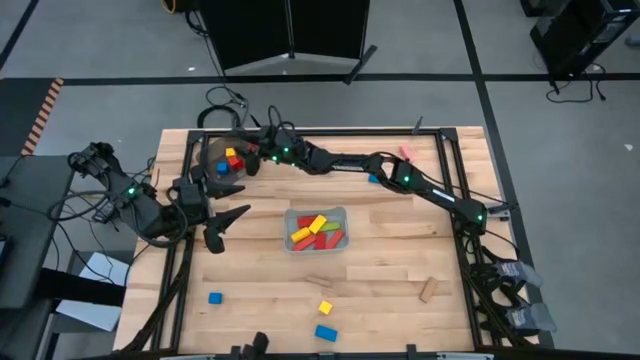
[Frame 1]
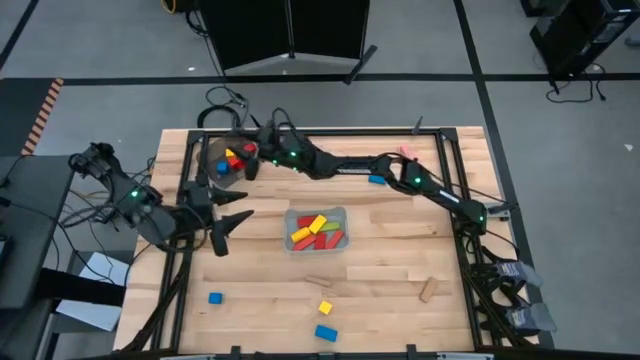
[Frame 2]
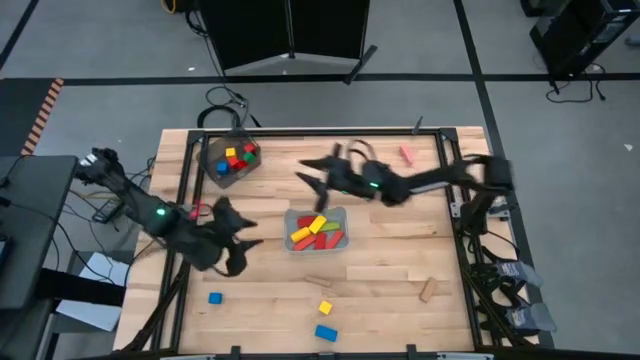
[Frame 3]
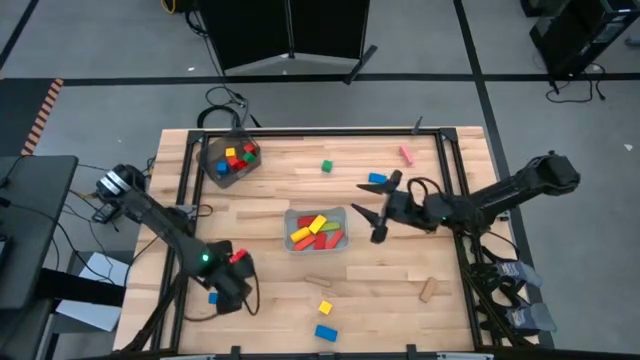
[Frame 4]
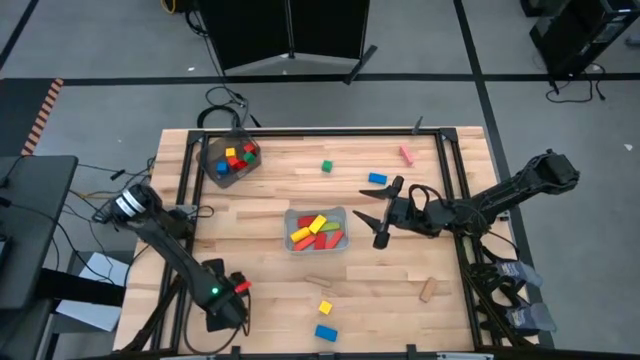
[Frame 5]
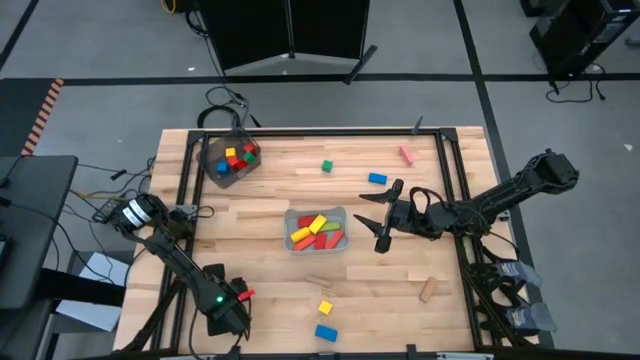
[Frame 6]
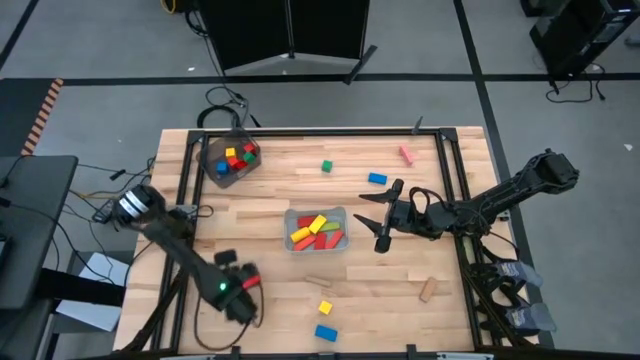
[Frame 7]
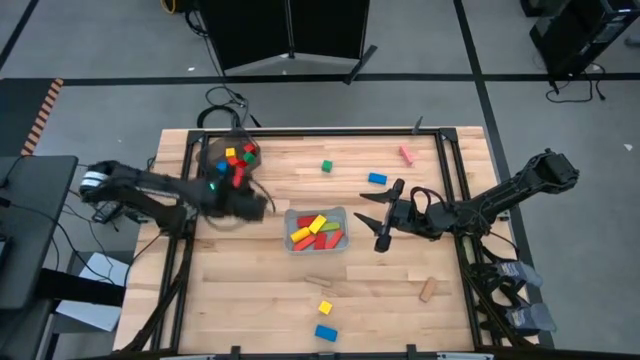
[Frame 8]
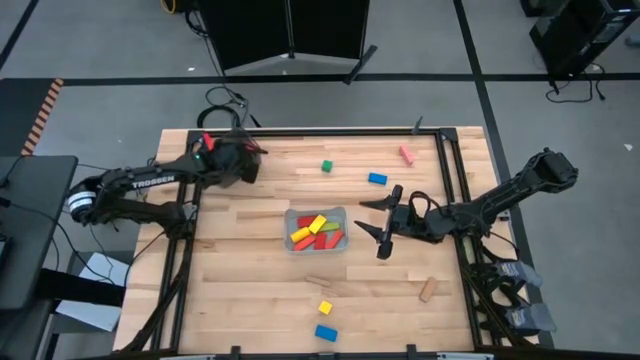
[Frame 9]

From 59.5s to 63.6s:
Task: Sort blocks by size
Put the blue cube block into the black bin

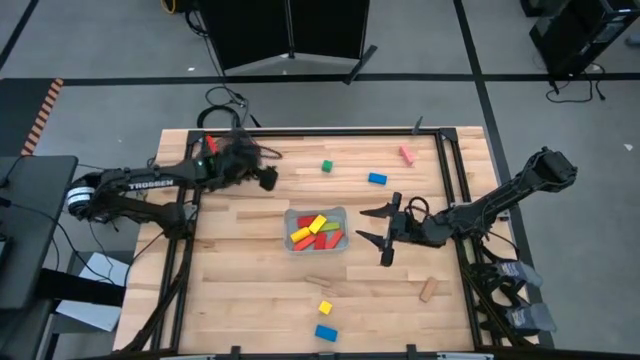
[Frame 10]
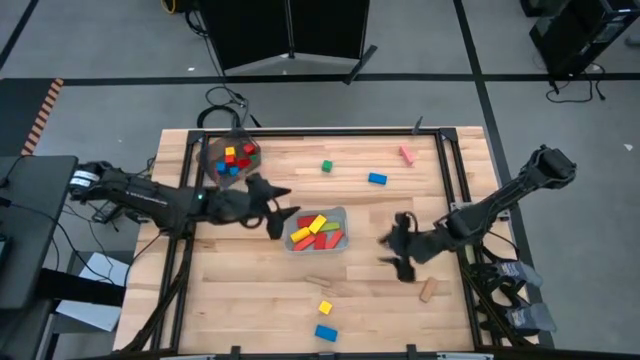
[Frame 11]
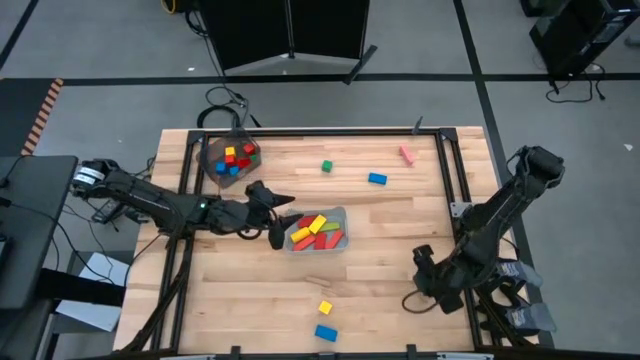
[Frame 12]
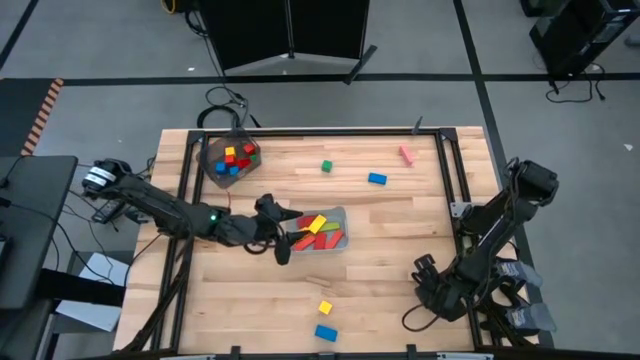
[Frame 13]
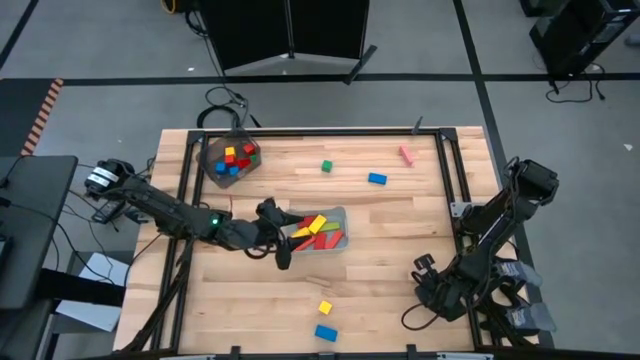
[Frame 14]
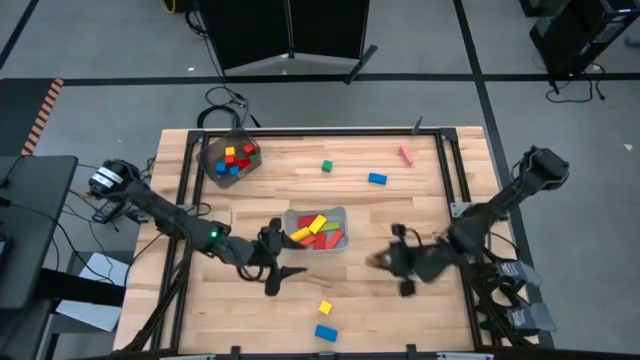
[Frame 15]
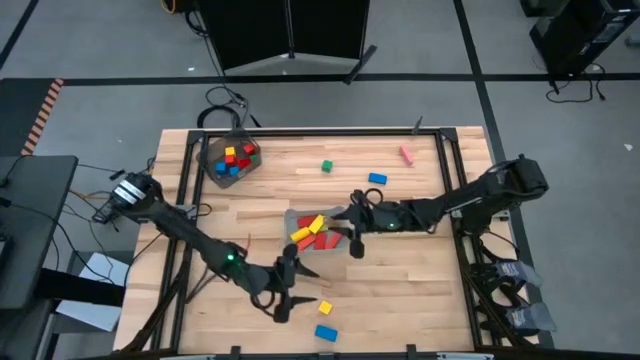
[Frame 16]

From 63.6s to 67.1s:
Put the right brown rectangular block into the gray bin

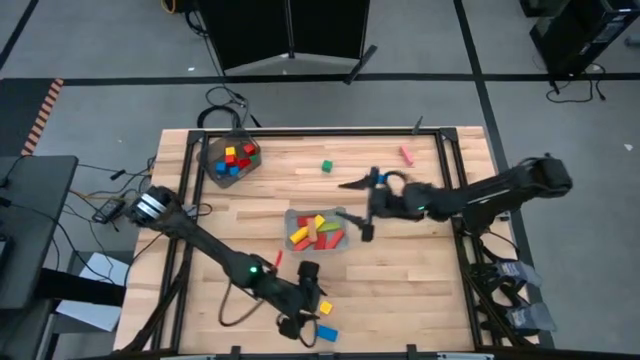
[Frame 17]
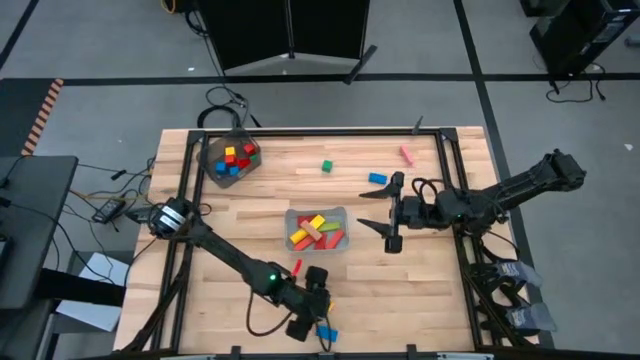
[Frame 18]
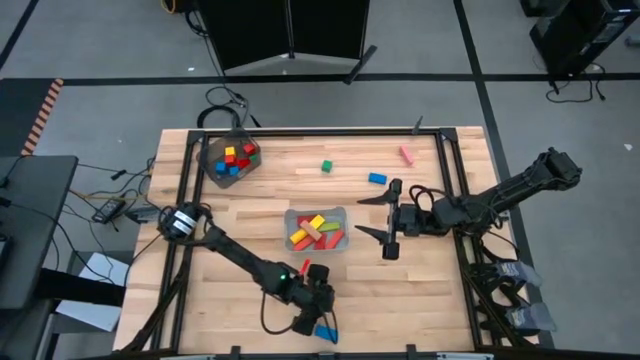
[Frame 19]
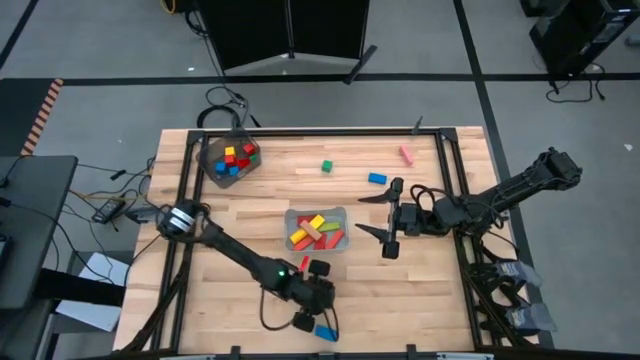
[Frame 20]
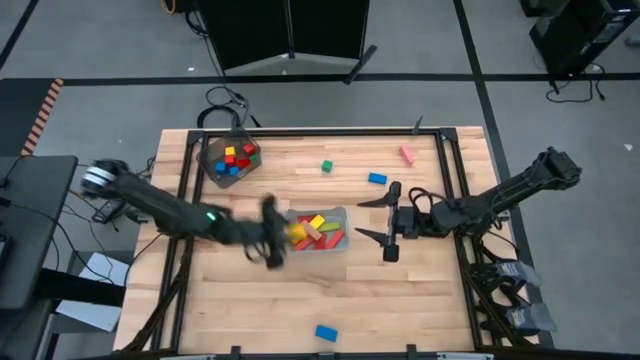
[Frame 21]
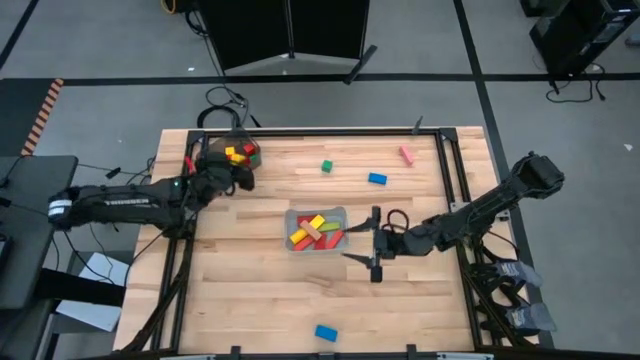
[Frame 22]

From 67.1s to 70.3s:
Put the yellow cube block into the black bin

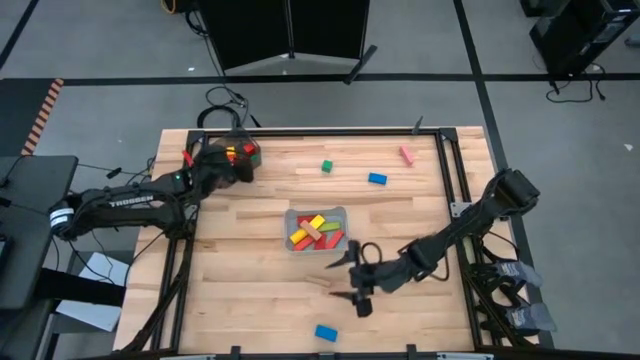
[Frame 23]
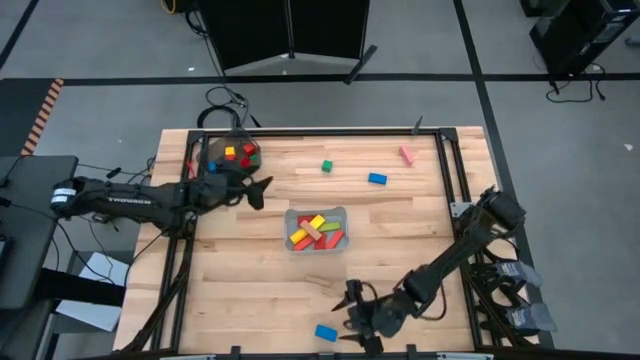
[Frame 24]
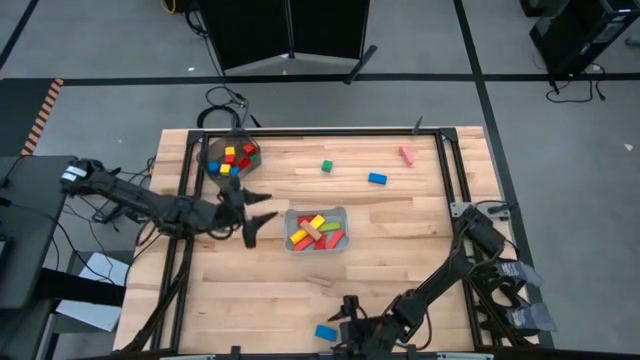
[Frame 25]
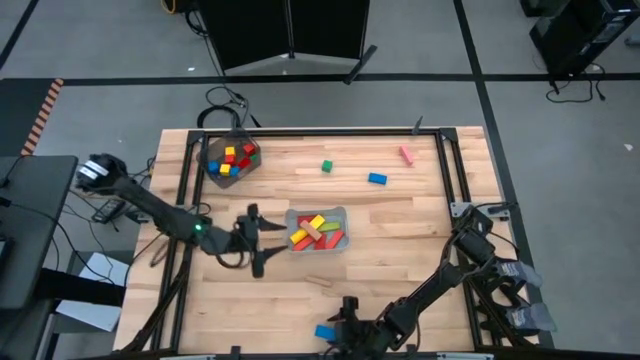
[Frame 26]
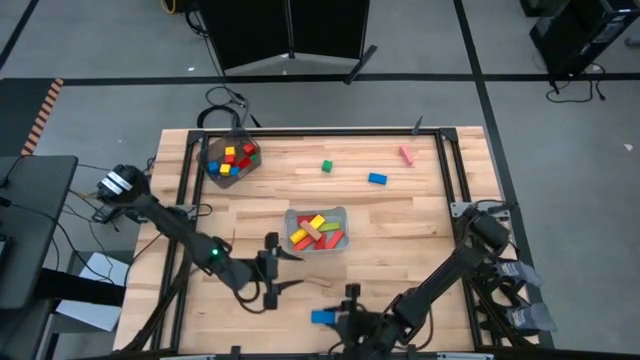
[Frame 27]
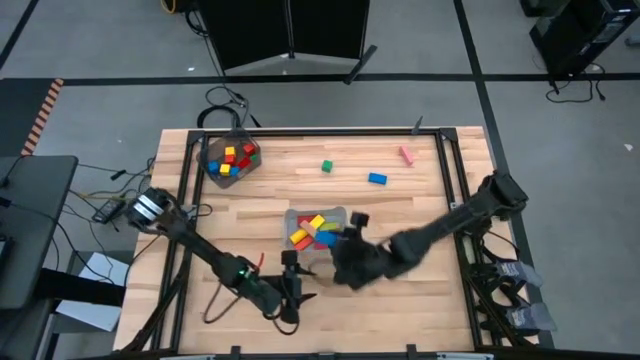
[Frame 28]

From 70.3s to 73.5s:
Put the bottom blue rectangular block into the gray bin

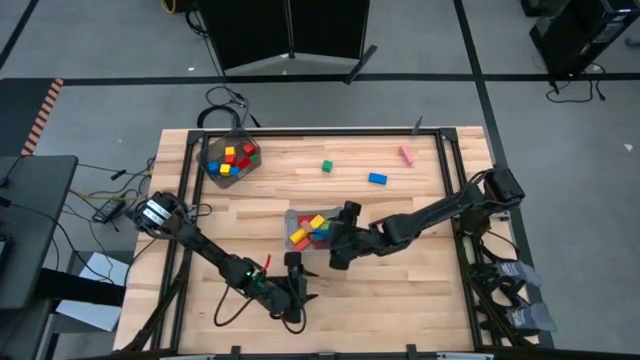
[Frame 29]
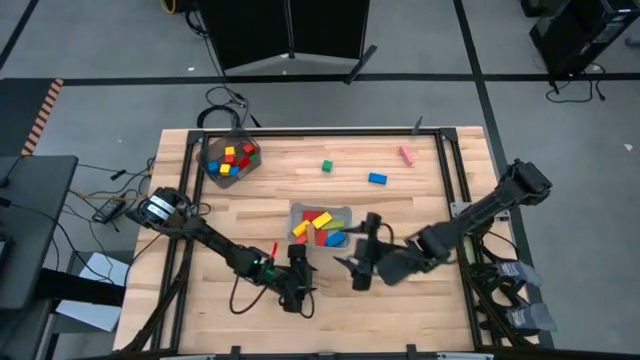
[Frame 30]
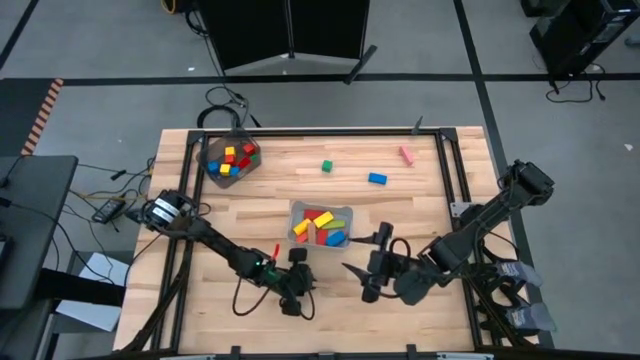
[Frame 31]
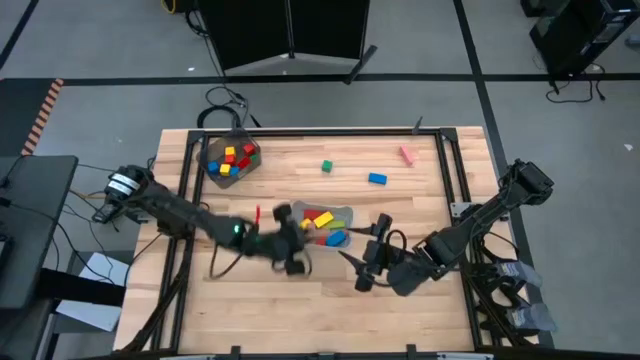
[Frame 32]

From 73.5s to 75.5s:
Put the brown rectangular block into the gray bin

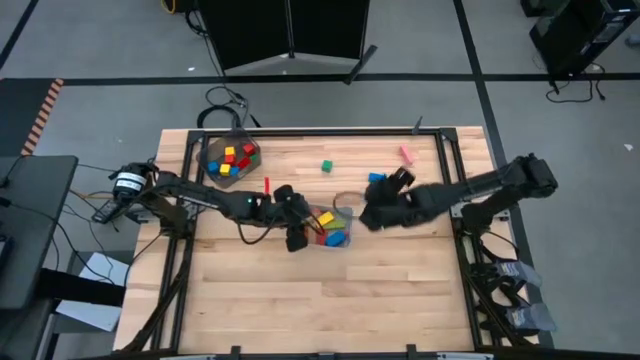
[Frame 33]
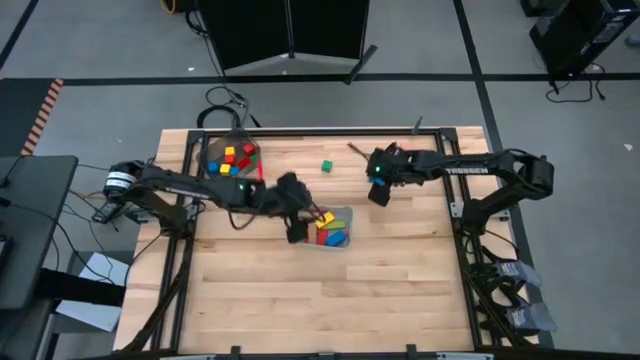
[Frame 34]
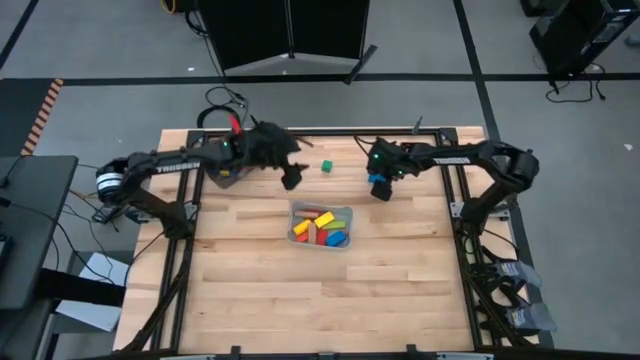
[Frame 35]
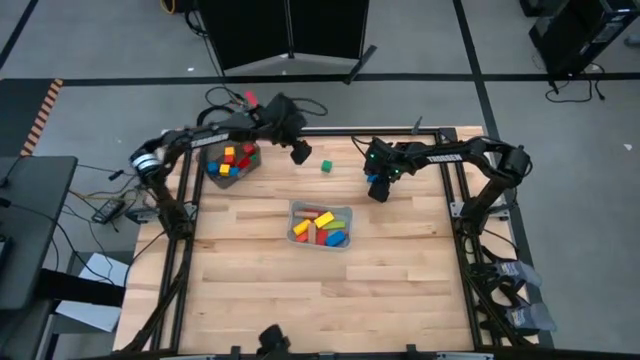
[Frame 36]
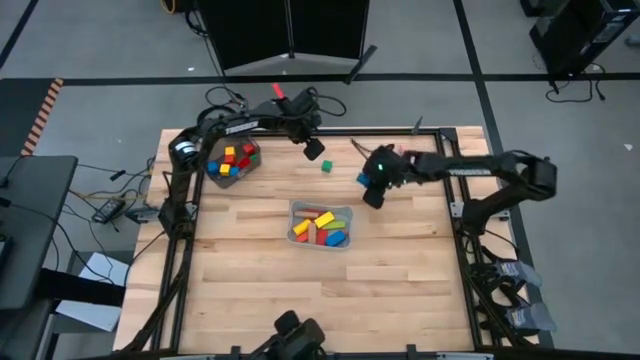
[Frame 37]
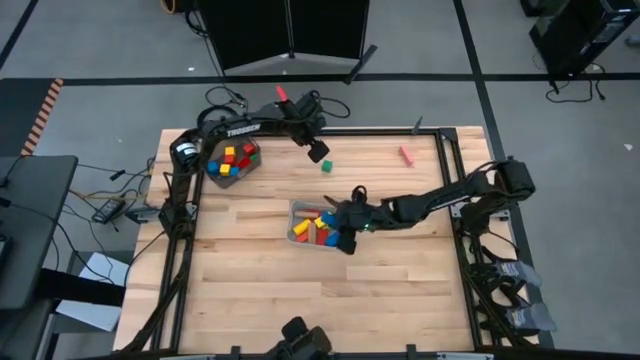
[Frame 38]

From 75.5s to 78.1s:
Put the blue rectangular block into the gray bin

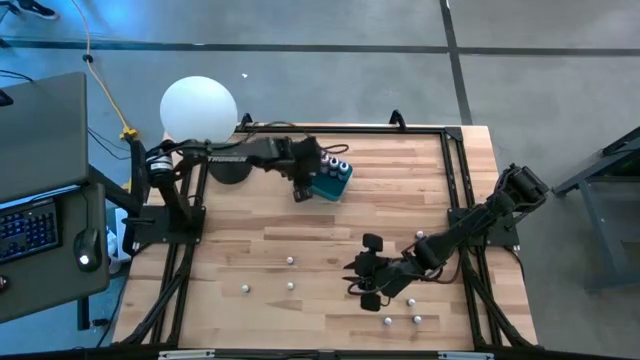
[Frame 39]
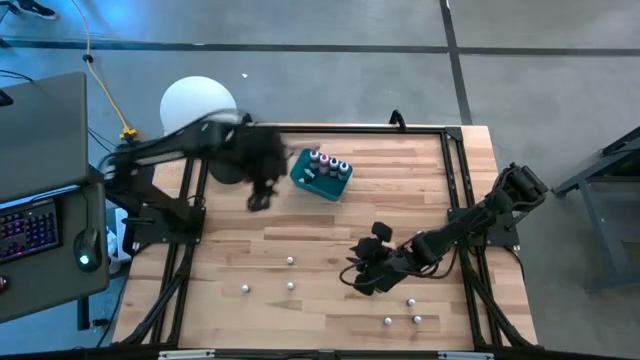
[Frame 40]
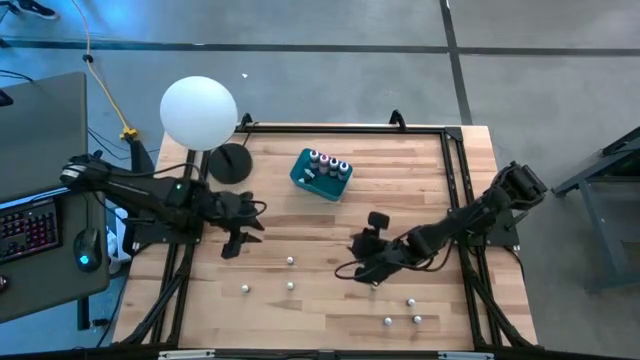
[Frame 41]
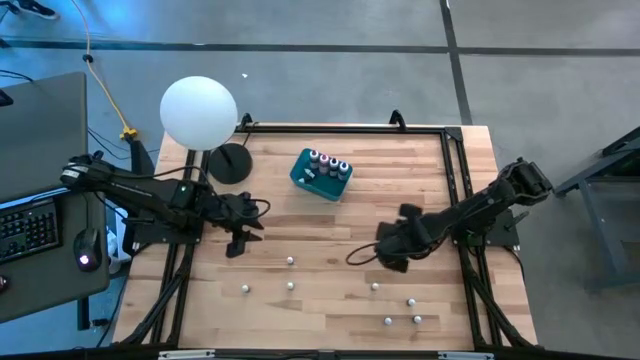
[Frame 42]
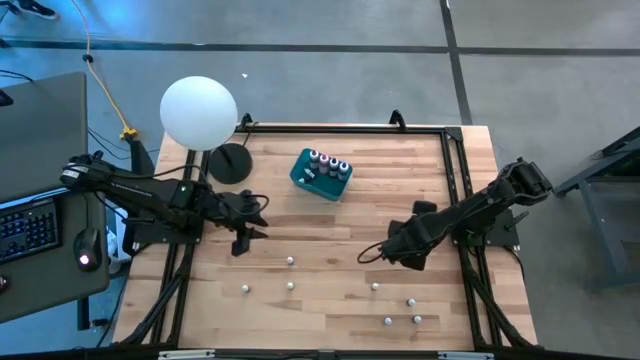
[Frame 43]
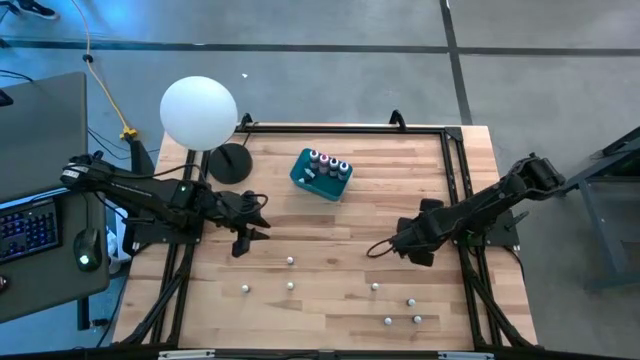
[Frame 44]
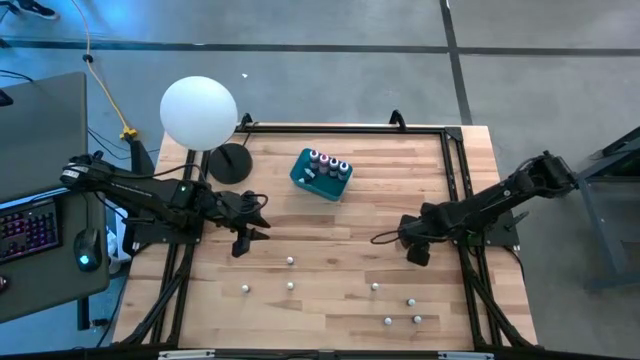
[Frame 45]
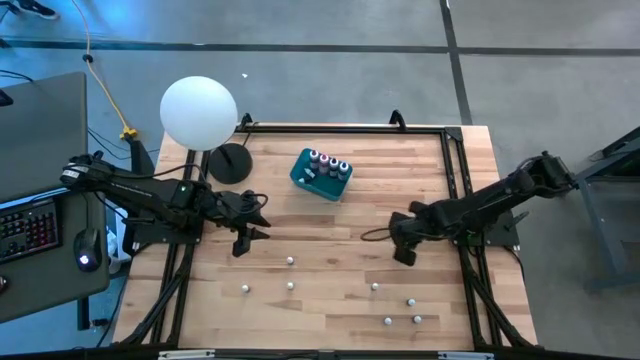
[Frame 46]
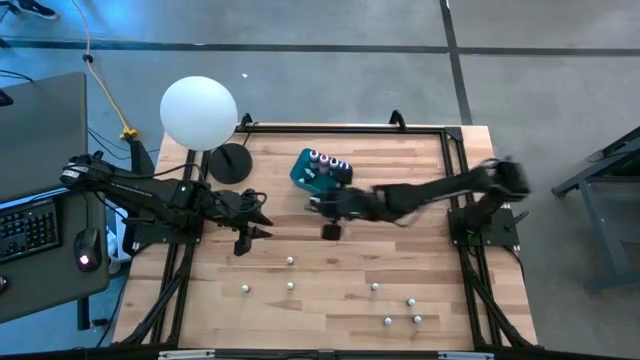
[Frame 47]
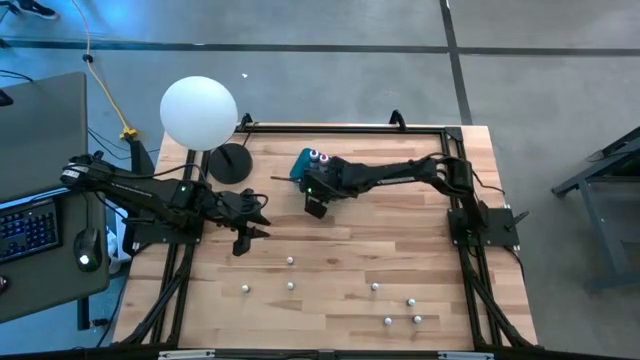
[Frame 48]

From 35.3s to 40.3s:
Task: Pick & Place food coloring
Put the black food coloring bottle into the blue bin
